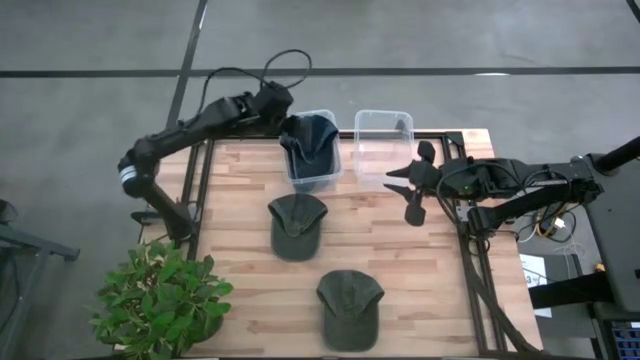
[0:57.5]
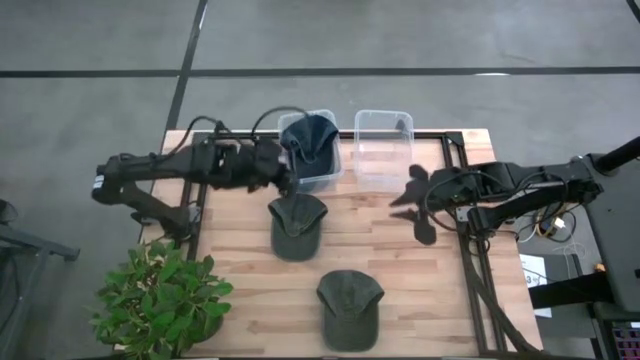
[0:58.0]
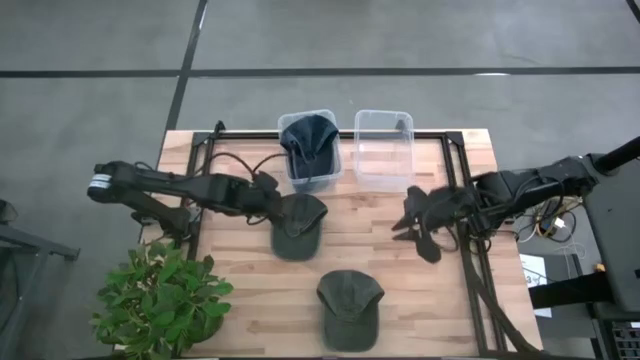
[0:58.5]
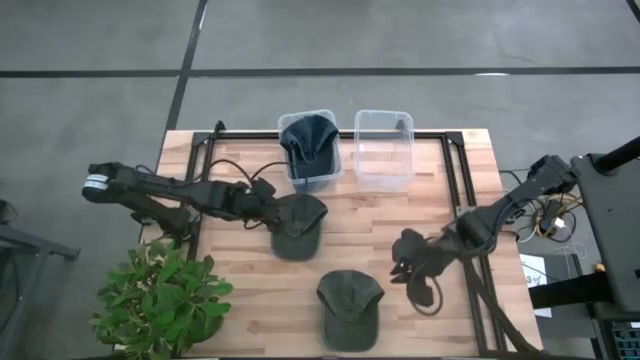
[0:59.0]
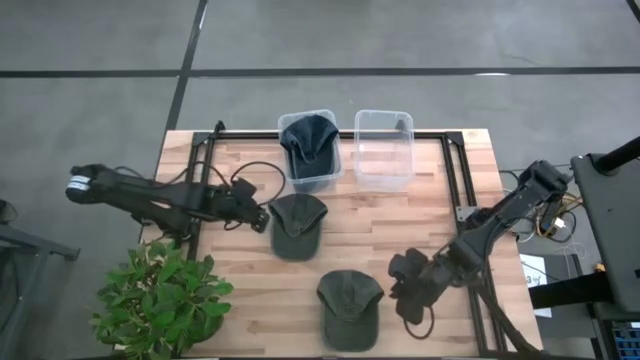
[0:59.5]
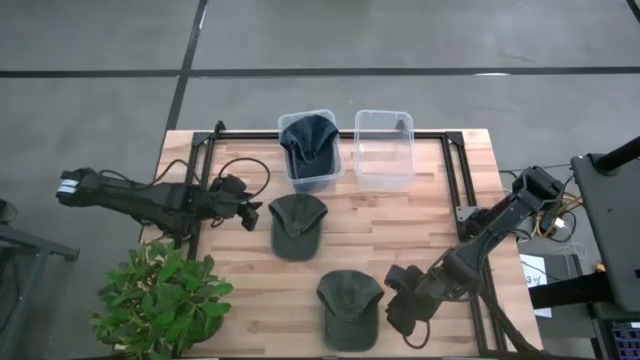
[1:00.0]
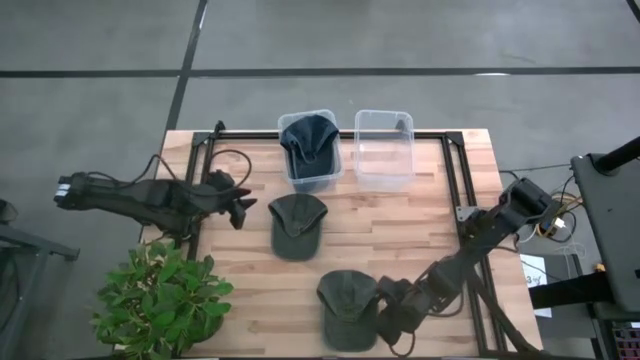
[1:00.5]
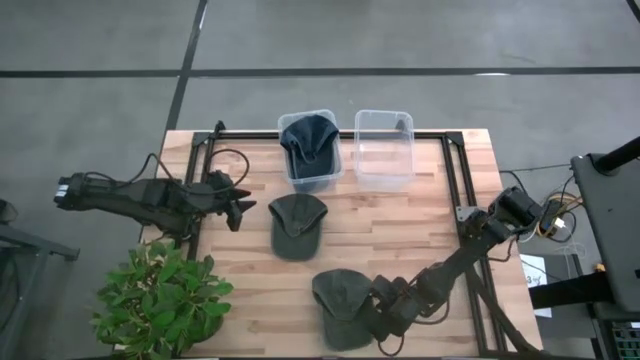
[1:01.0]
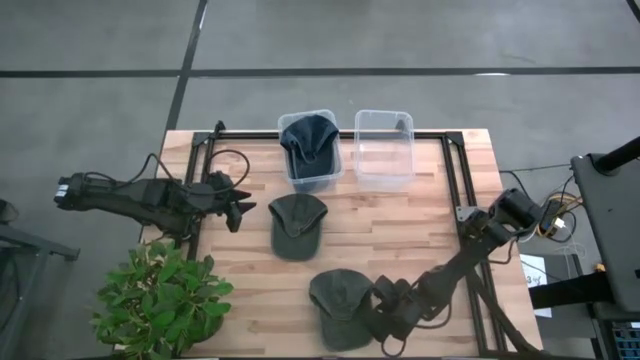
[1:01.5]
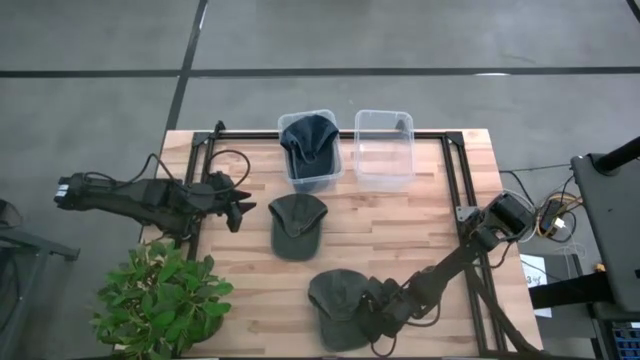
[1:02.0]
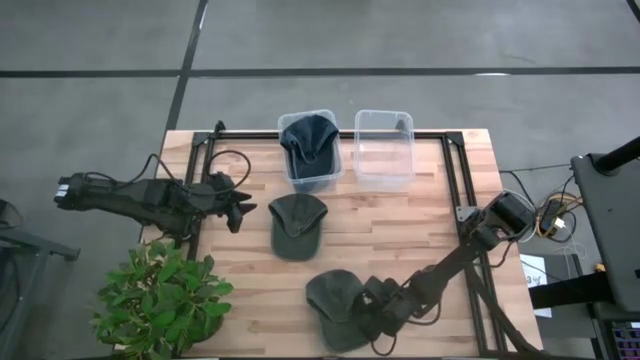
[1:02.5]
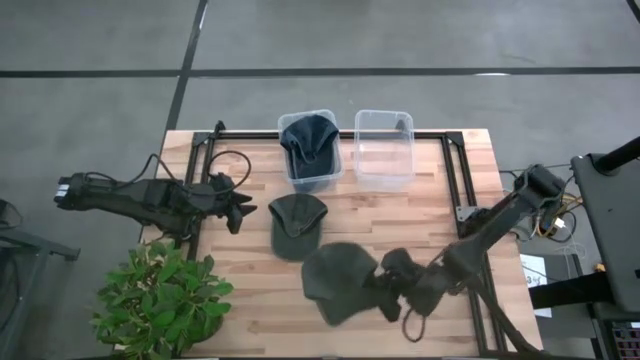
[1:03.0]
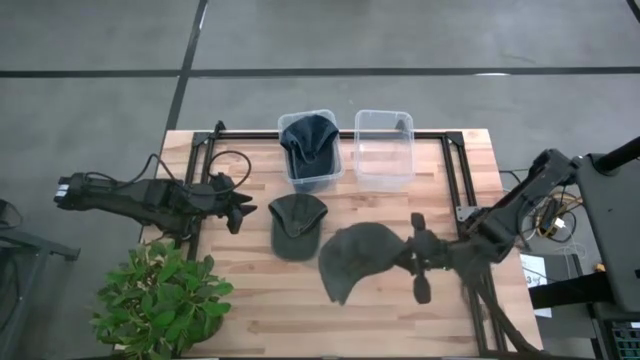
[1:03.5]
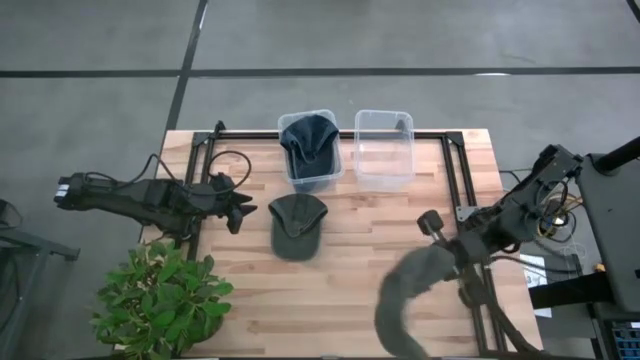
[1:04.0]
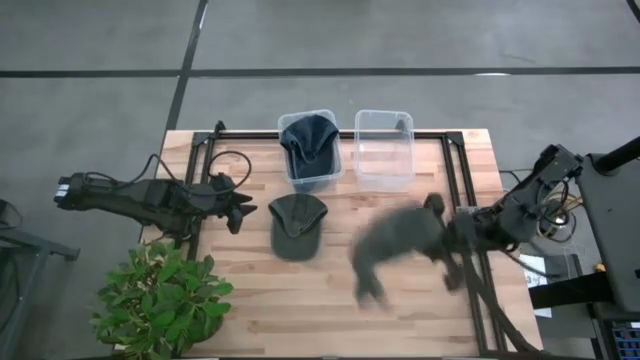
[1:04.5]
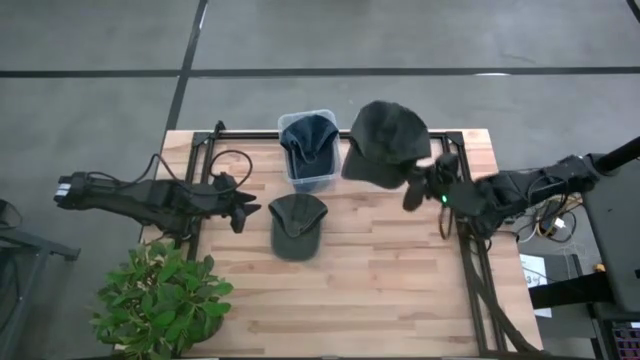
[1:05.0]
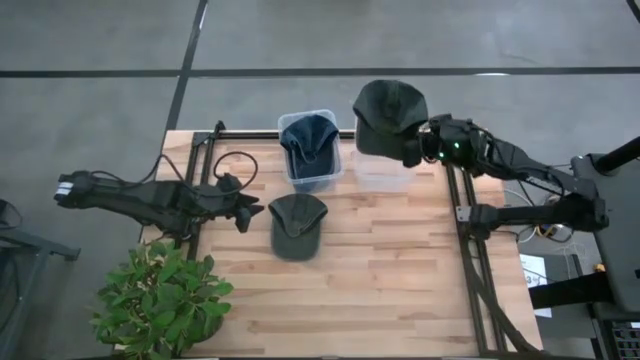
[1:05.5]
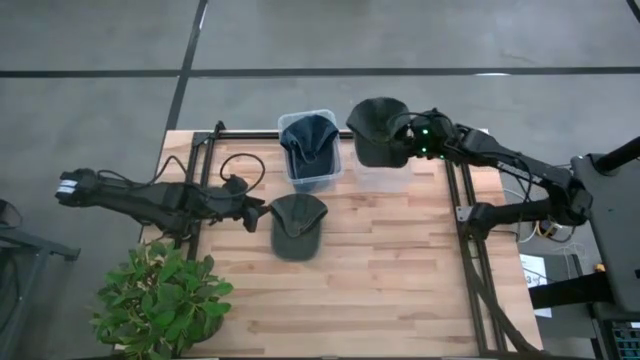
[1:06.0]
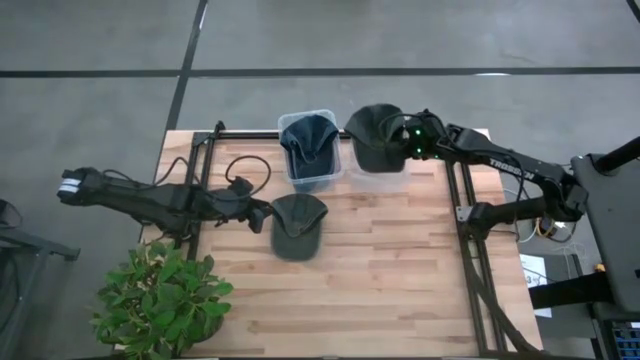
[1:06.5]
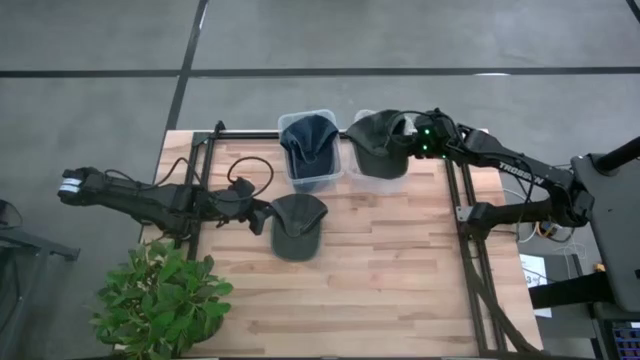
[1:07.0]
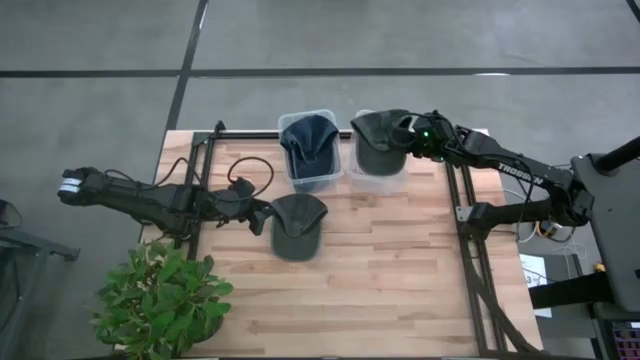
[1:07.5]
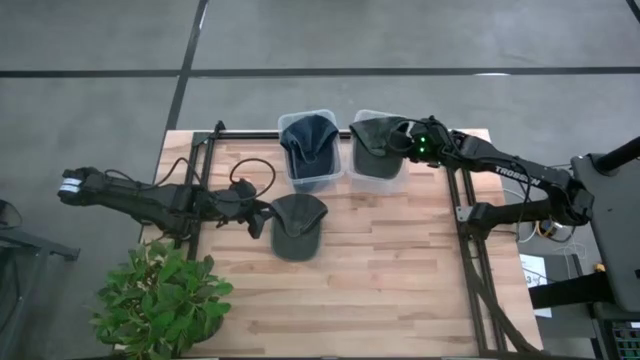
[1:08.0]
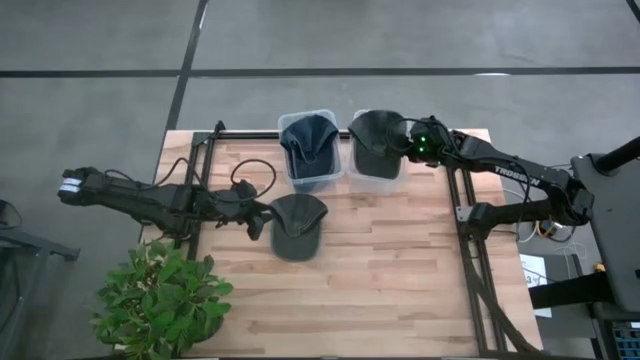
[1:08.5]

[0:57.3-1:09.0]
Task: Pick & Place hat
Put the bottom gray cap into the right transparent bin

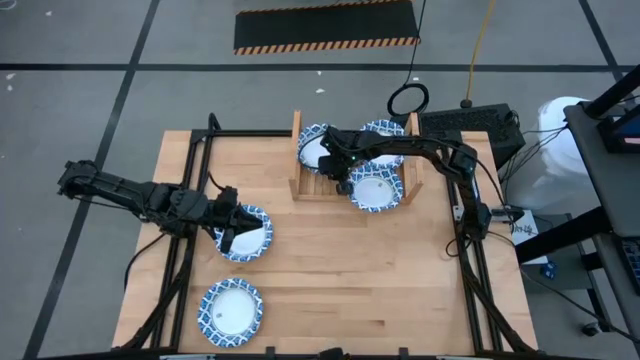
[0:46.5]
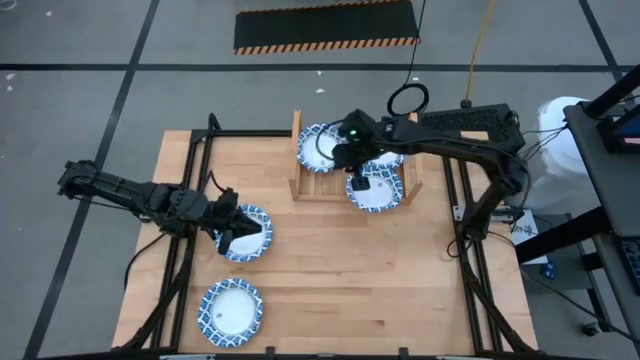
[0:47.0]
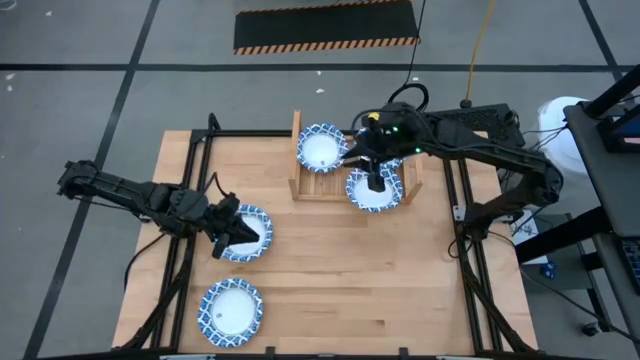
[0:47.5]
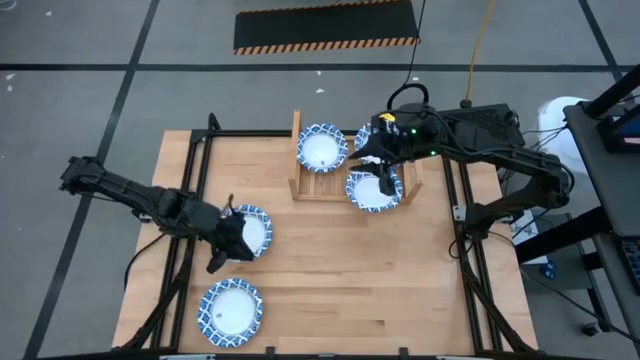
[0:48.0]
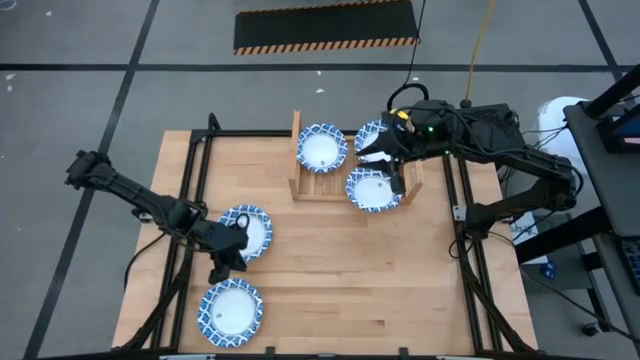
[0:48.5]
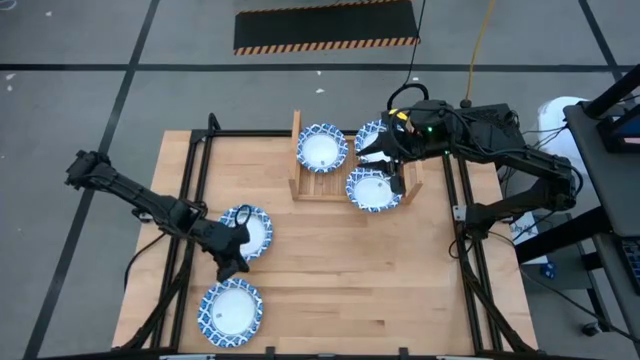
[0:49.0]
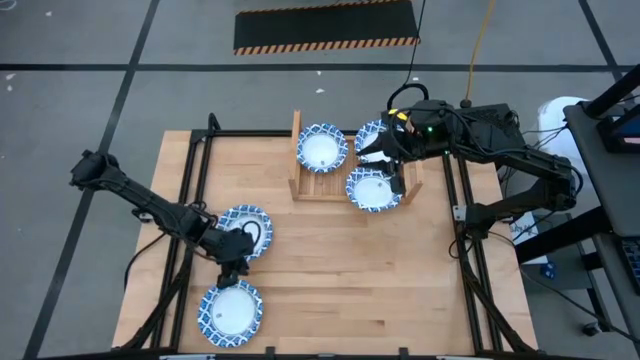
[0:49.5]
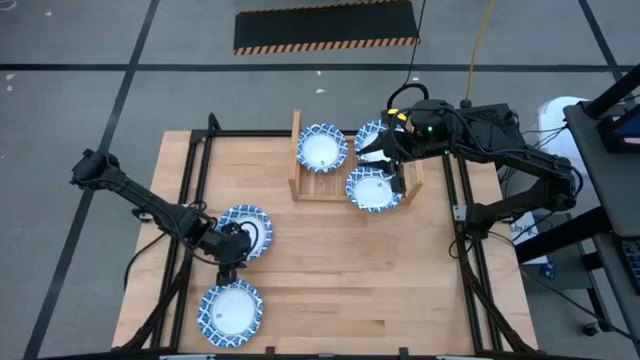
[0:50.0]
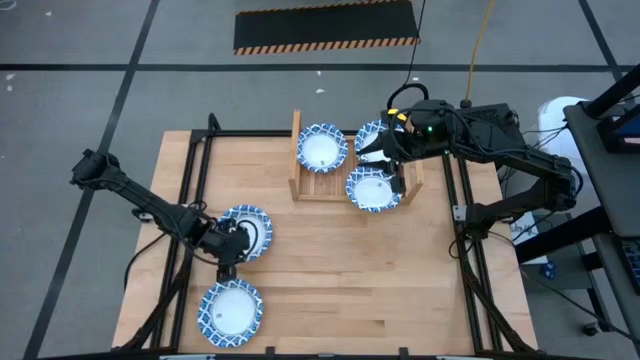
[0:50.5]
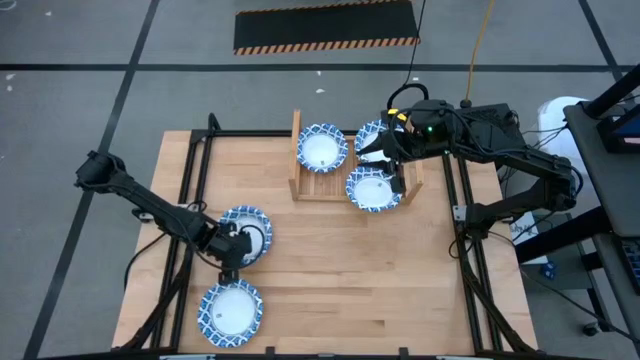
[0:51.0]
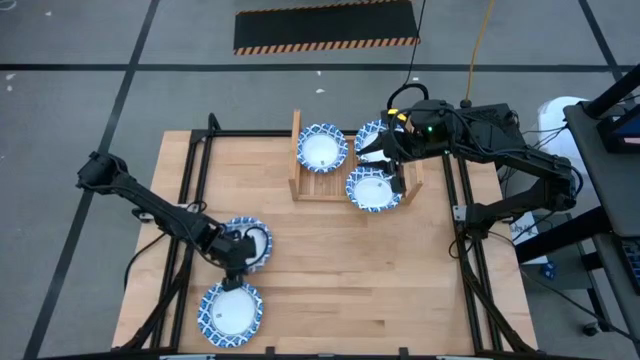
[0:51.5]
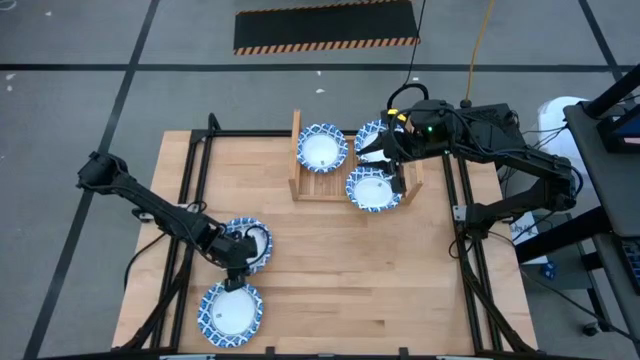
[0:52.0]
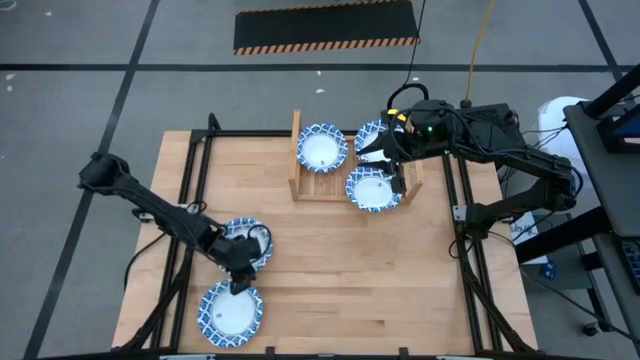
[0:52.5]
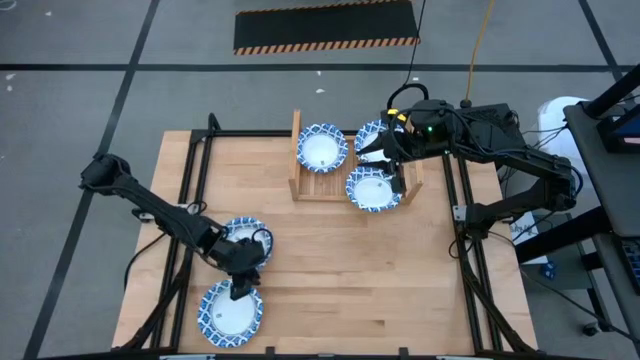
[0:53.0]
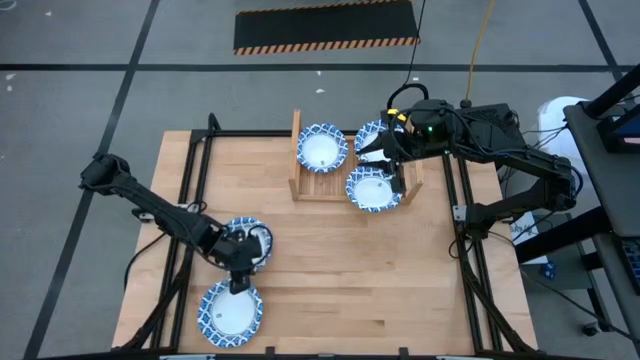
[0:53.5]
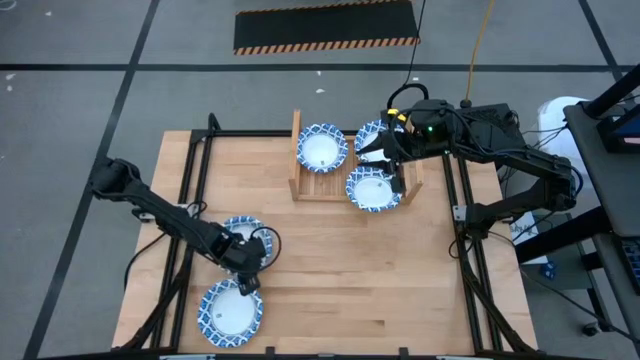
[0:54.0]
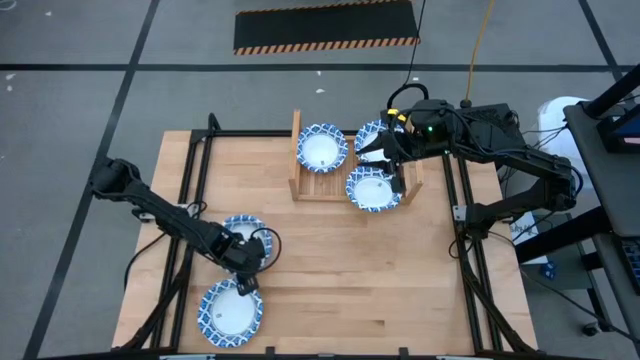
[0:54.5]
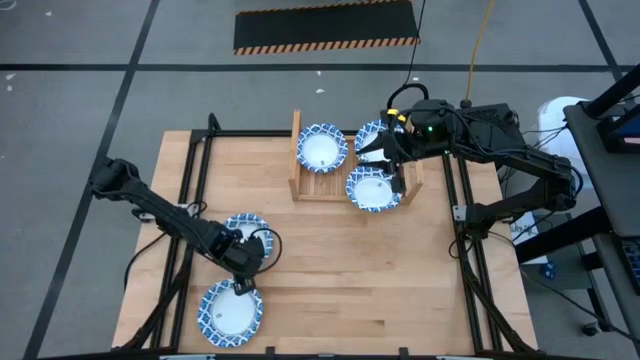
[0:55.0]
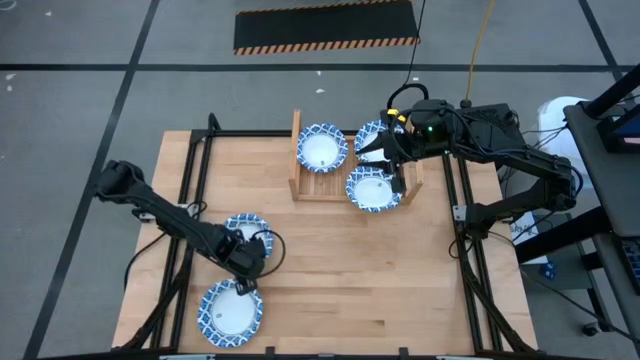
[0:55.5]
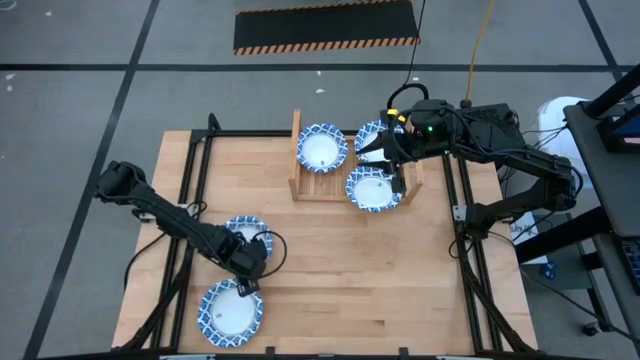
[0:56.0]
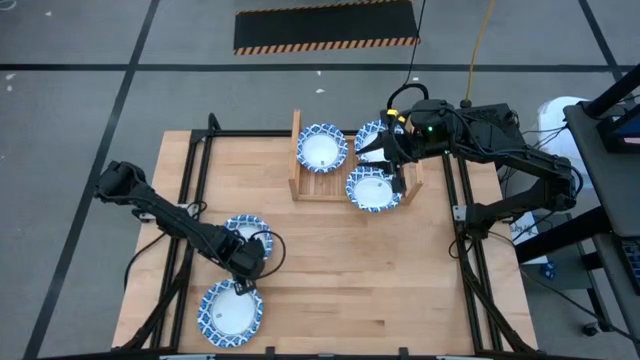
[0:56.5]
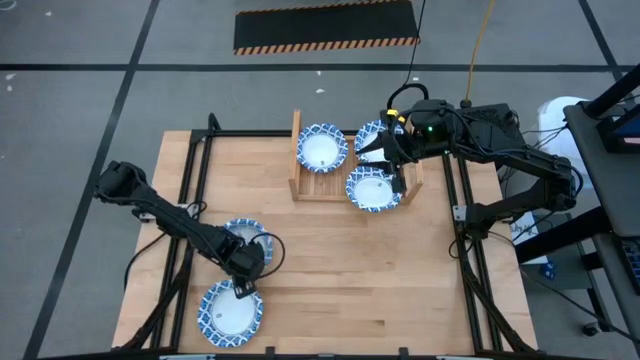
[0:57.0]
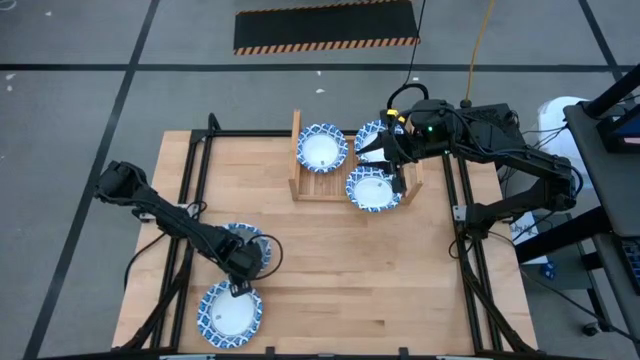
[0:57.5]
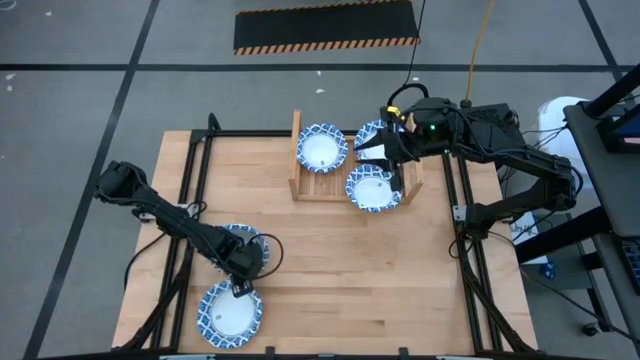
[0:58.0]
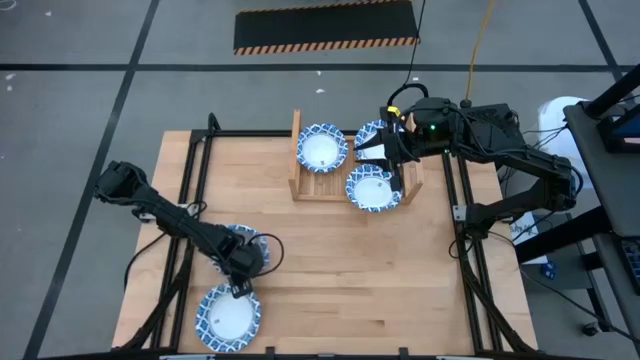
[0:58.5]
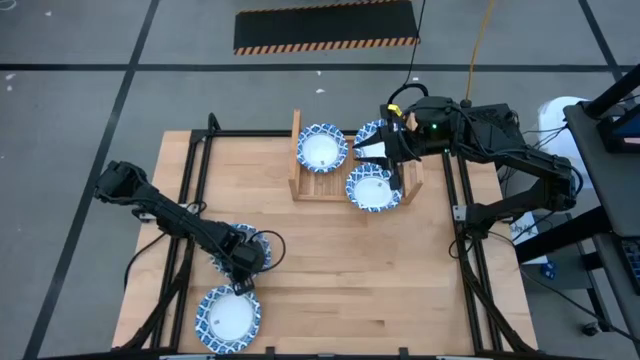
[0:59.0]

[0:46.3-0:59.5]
Task: Place and stack bowls onto a shelf
Stack the right blue patterned bowl on top of the other blue patterned bowl on the shelf
